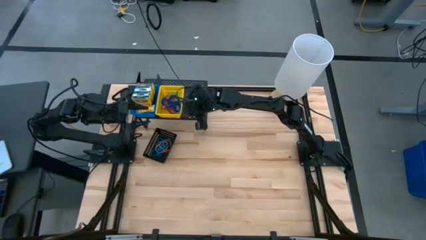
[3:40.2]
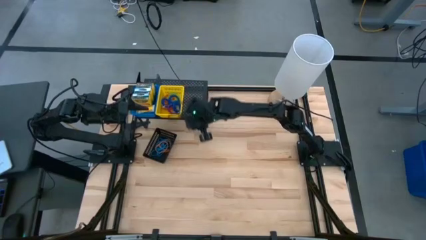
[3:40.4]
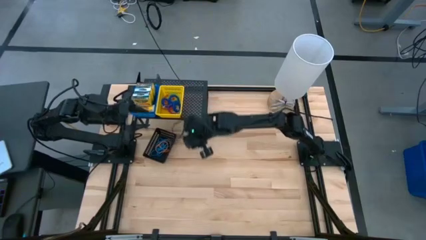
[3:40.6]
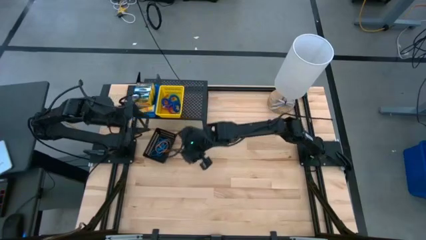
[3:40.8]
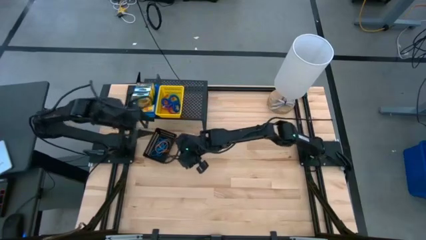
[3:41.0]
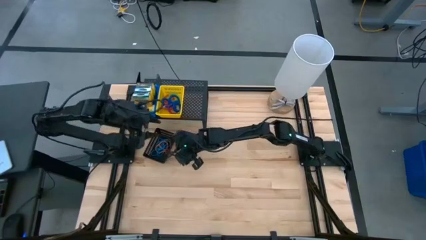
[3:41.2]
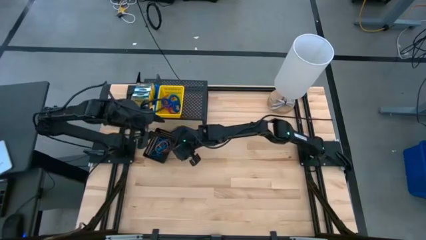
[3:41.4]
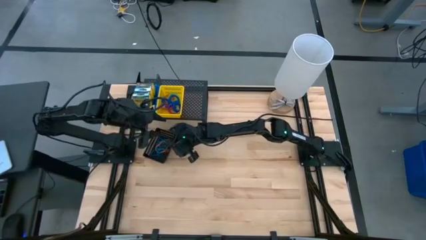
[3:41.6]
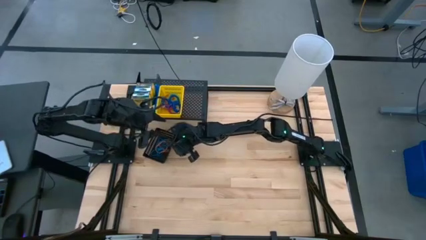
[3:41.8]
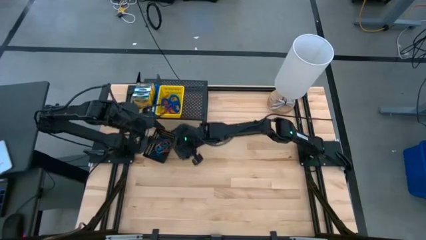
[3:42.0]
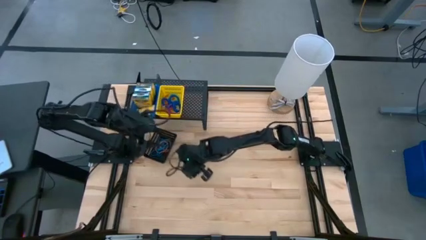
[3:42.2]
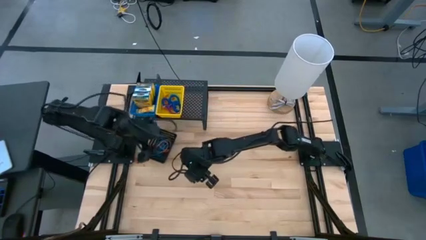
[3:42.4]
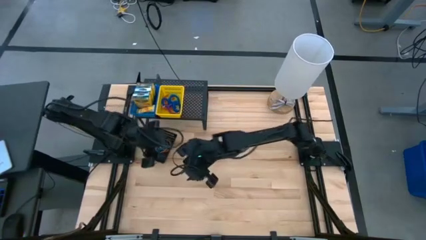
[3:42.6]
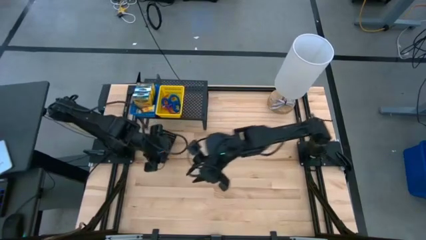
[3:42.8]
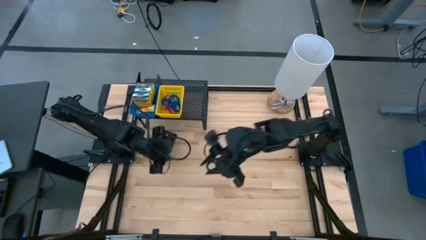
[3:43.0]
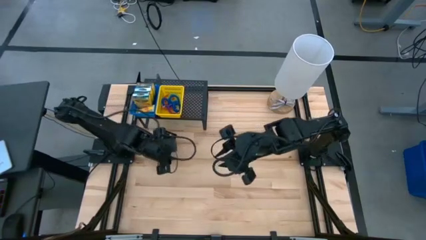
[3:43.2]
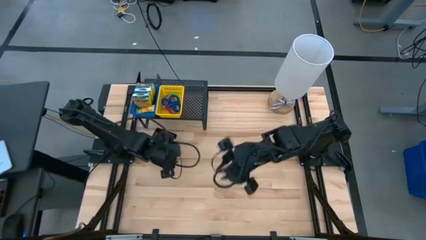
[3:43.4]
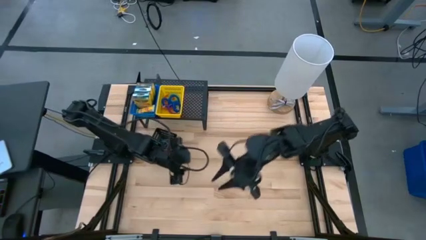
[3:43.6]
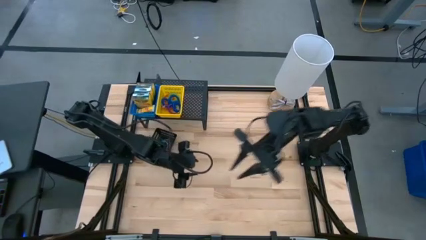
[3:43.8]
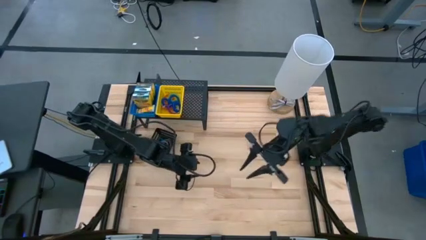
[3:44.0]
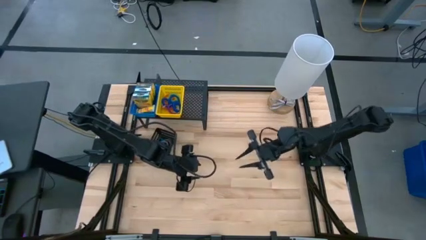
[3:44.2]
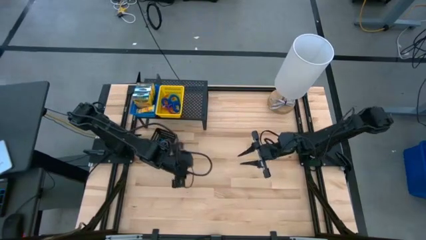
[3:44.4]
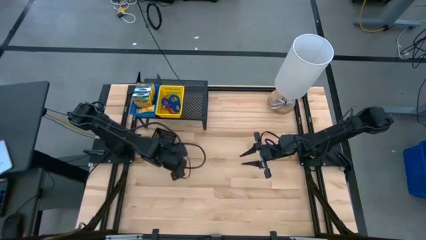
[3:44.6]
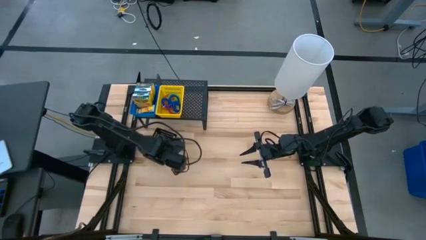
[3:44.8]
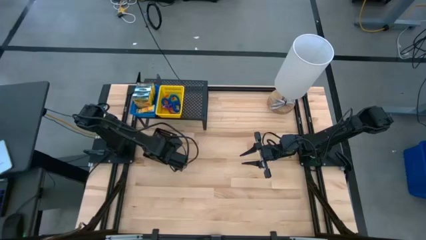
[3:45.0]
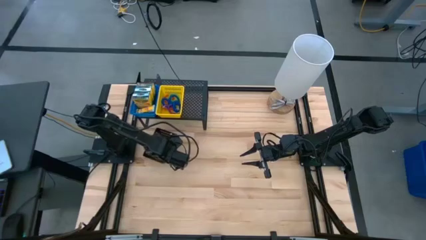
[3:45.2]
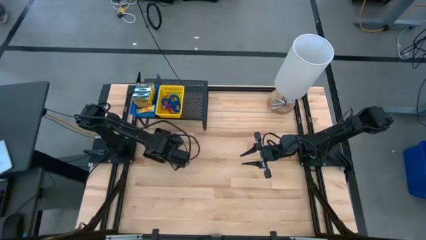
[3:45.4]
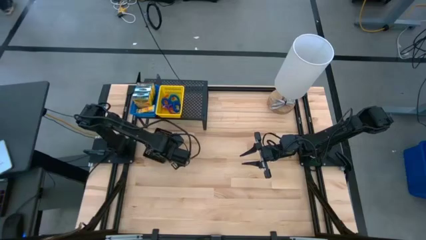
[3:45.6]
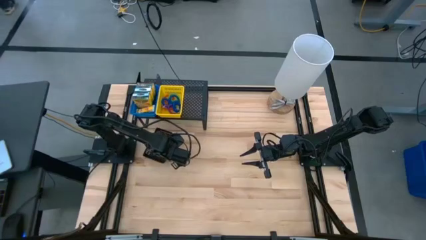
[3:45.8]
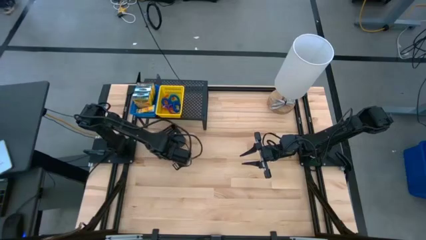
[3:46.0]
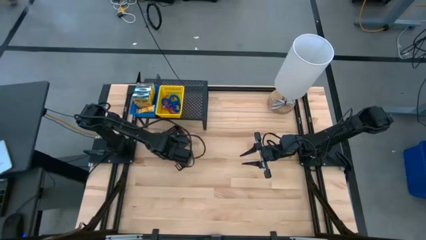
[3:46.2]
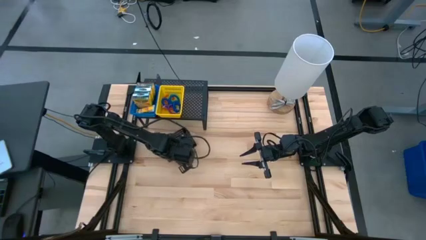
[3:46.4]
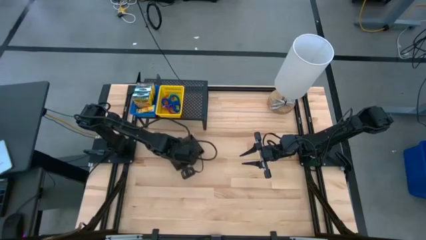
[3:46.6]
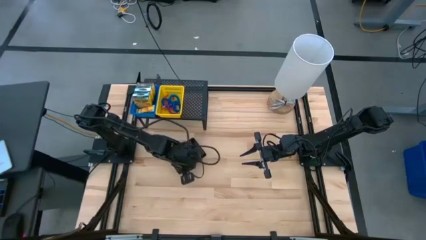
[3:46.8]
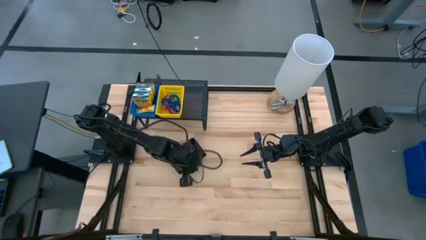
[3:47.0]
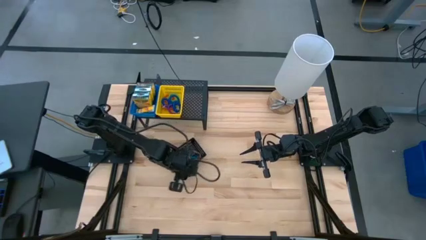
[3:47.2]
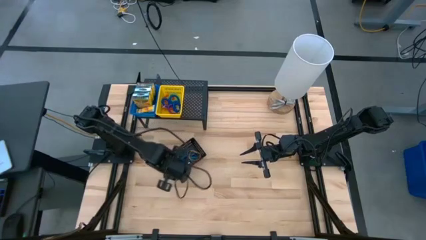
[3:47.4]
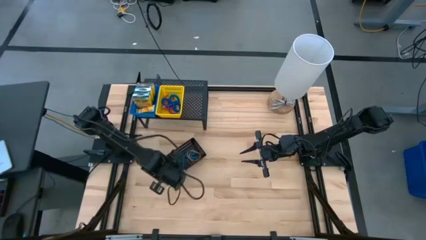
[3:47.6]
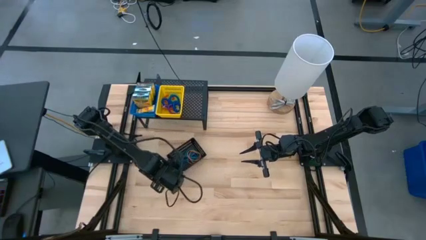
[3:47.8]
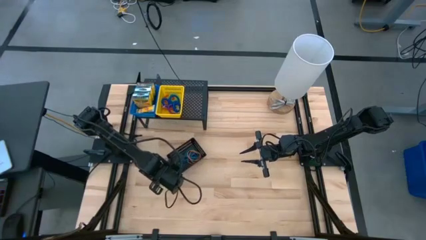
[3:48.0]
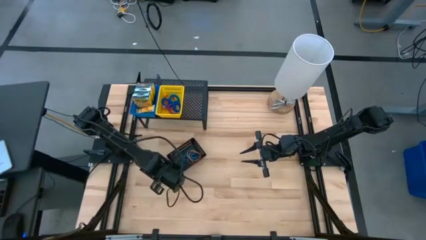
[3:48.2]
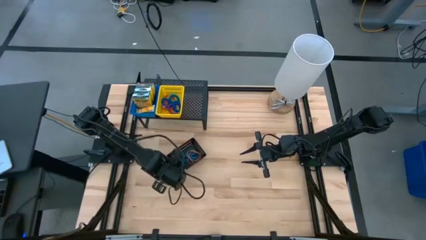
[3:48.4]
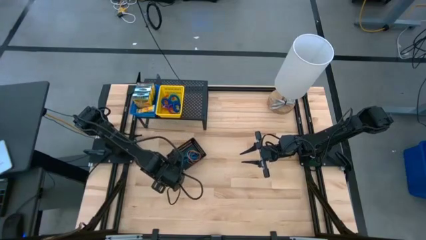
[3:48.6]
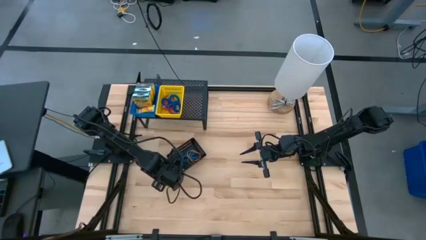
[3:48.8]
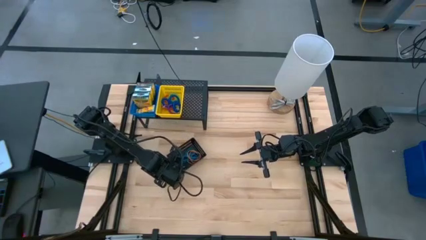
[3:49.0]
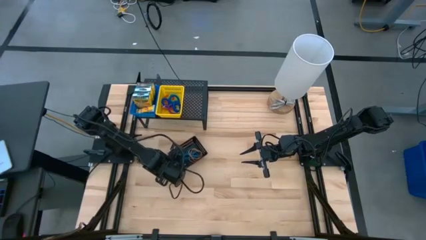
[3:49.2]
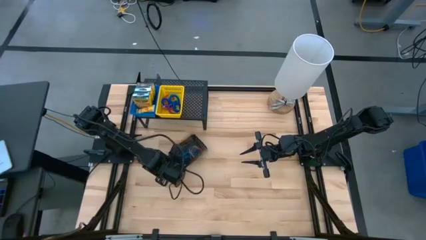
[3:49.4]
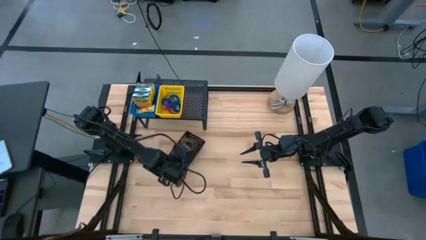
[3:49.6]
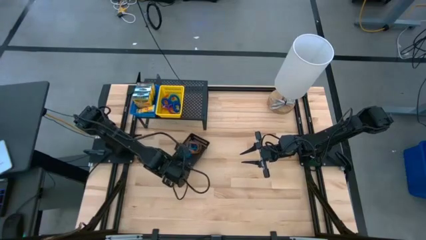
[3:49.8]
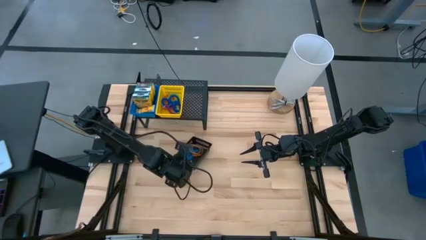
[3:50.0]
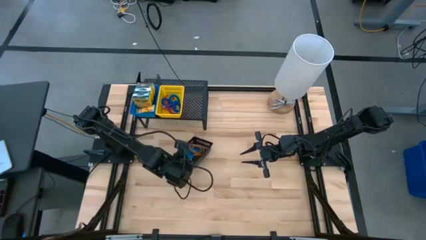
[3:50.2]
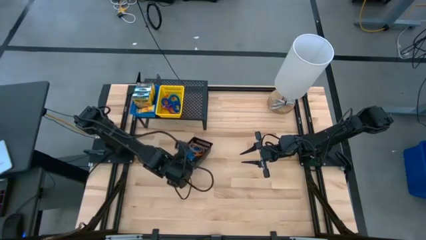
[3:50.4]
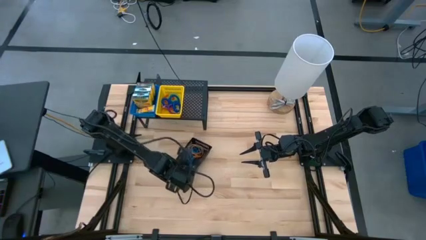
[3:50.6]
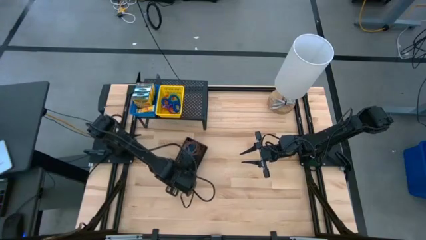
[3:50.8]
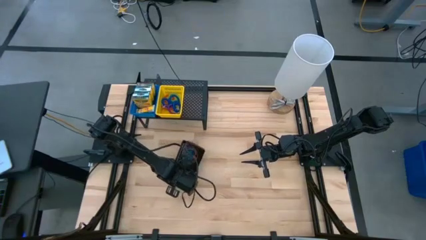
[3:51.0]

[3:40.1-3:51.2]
Task: Pick & Place Office Desk Supplies
Put the black bin on the shelf

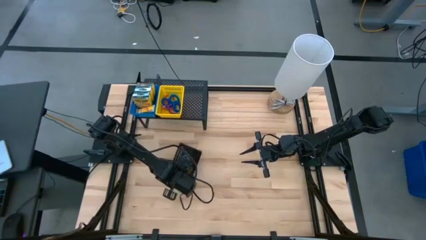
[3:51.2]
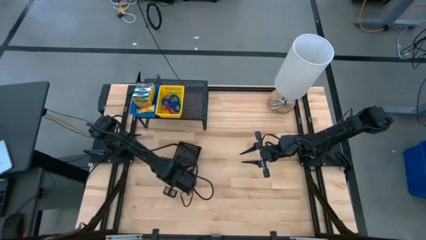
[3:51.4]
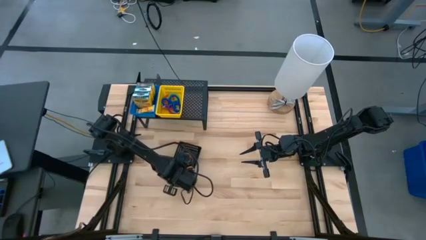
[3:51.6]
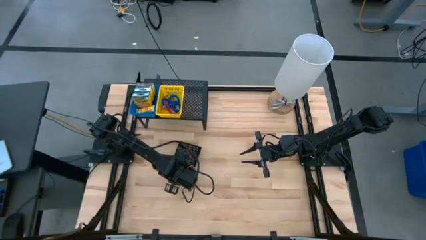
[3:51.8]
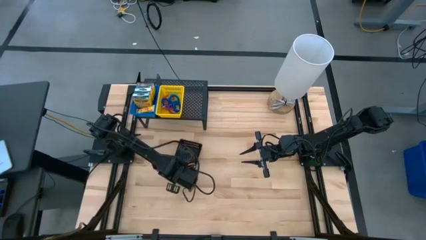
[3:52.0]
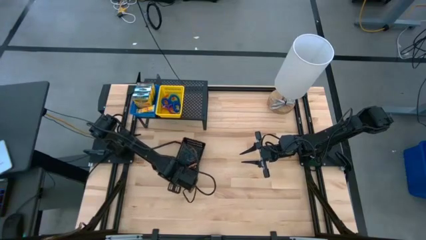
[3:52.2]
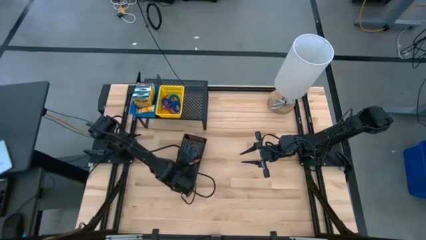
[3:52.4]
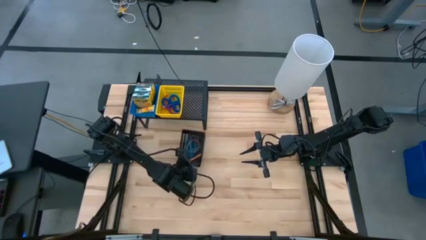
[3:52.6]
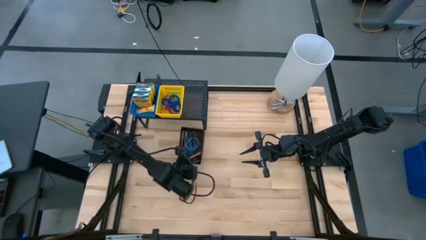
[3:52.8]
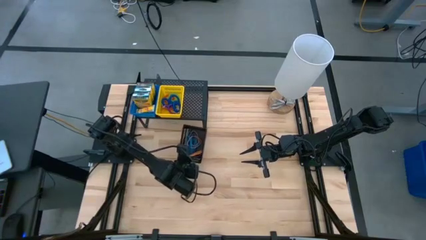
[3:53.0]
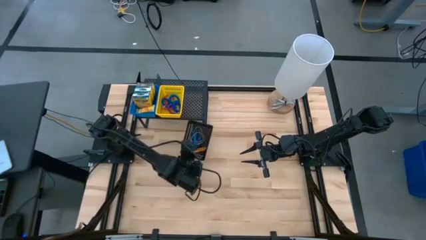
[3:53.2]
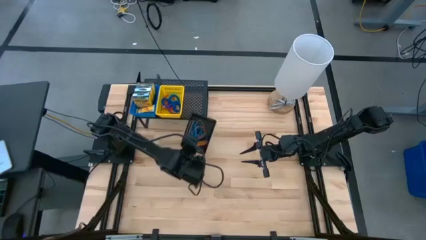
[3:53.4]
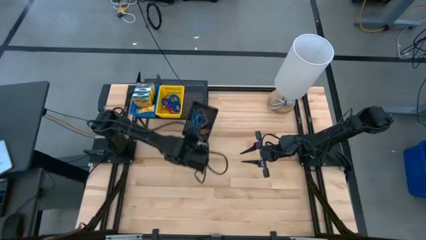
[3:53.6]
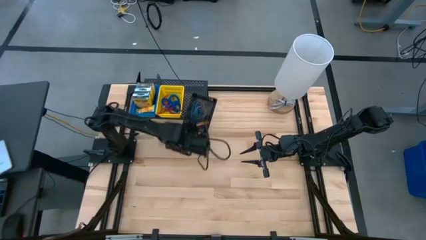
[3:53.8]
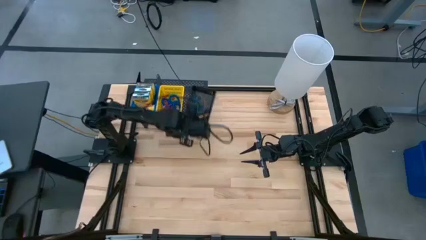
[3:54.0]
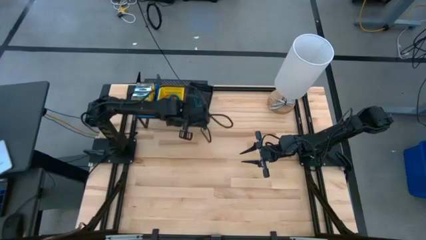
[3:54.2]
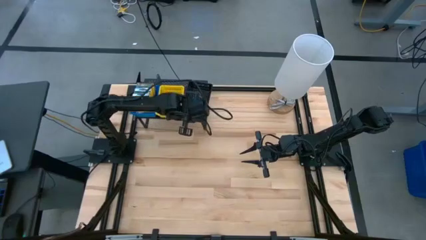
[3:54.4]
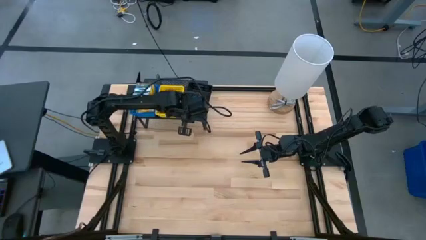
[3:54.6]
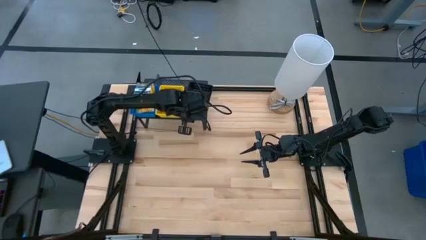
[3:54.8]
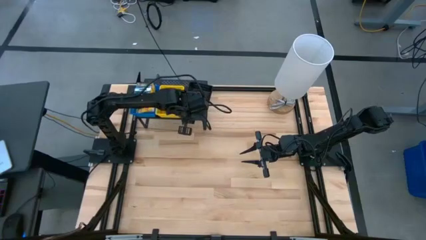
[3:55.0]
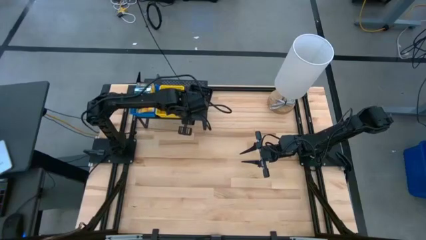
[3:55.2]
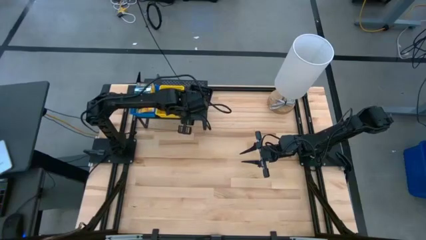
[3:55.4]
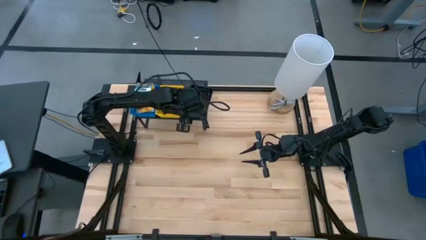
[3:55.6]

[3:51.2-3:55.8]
Put the black bin on the shelf
